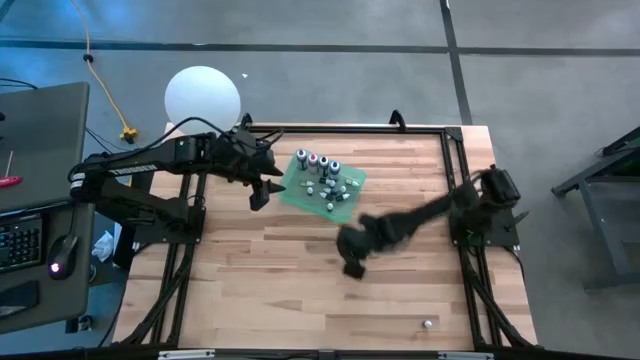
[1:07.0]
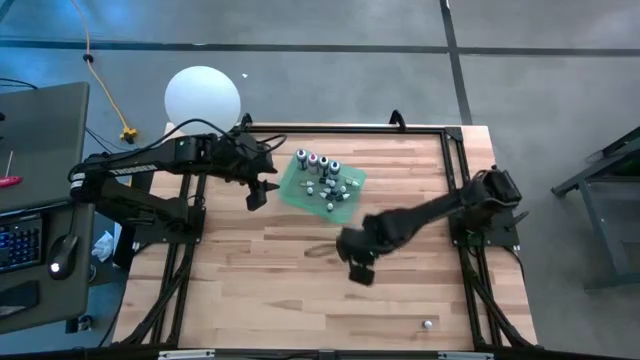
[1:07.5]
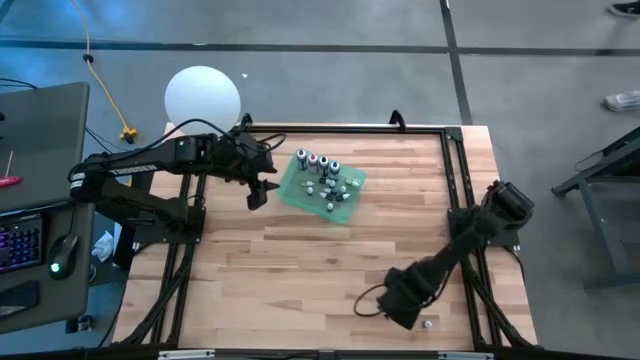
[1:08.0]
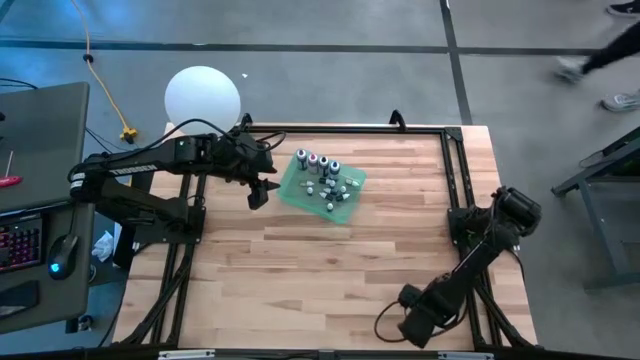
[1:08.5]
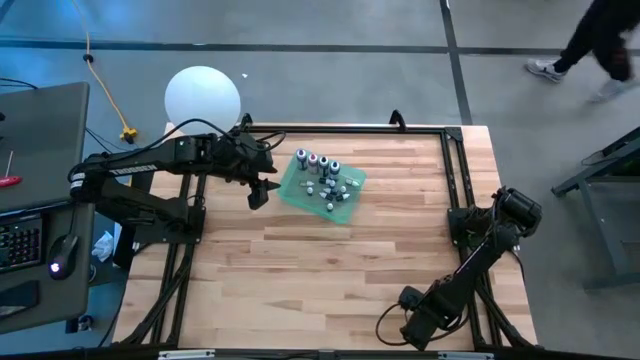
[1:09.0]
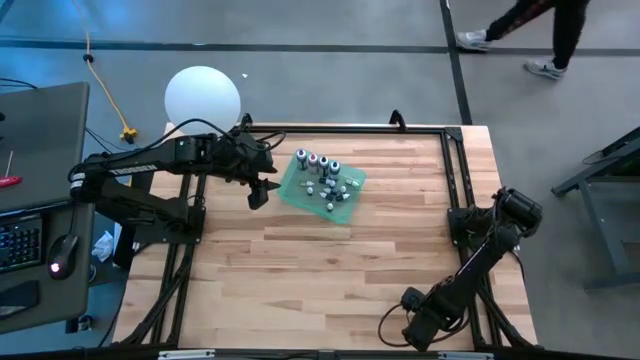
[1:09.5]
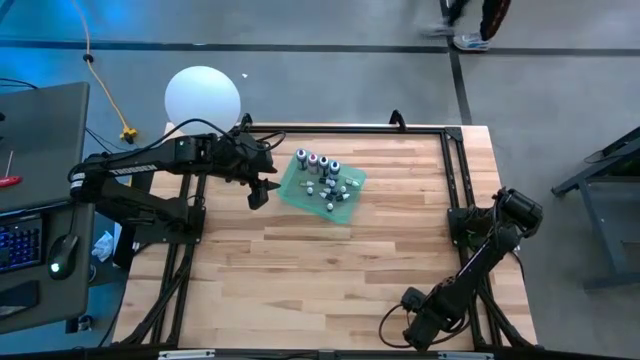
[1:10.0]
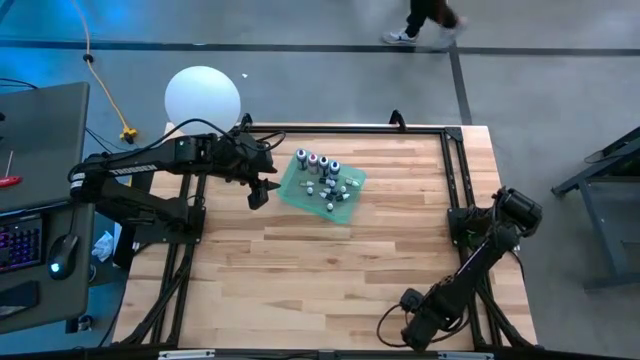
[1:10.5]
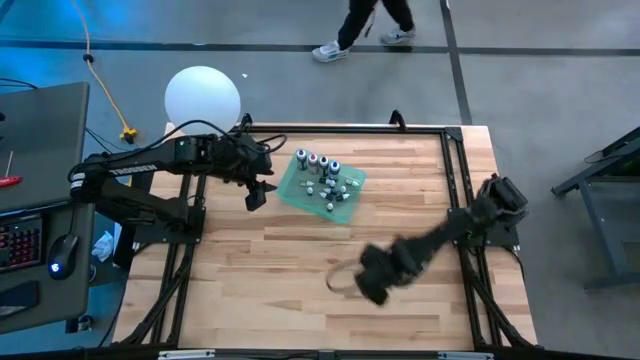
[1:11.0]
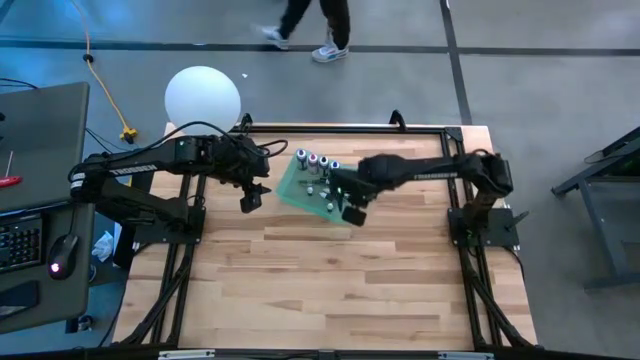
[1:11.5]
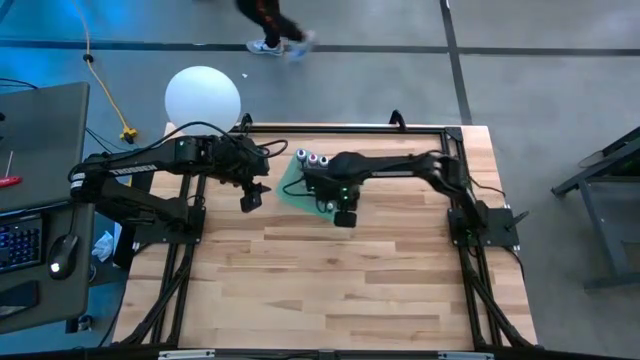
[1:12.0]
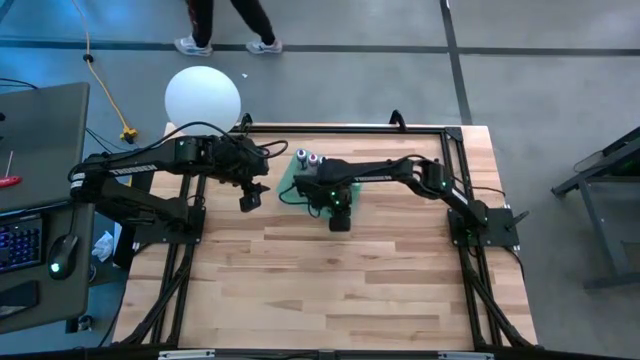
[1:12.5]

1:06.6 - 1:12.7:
Task: Pick & Place food coloring
Put the orange food coloring bottle into the bin

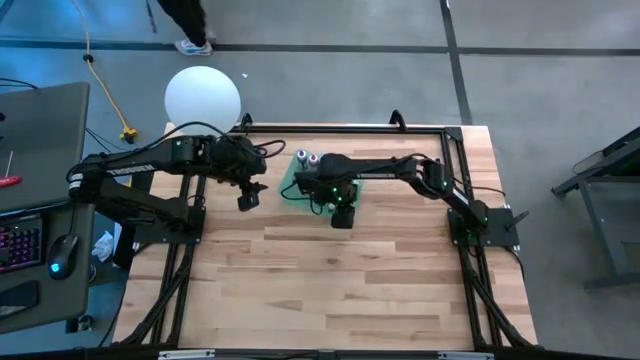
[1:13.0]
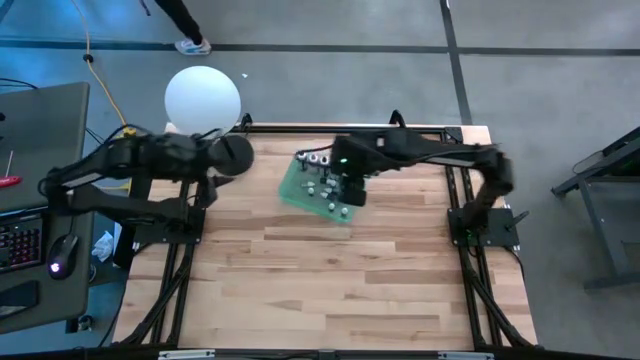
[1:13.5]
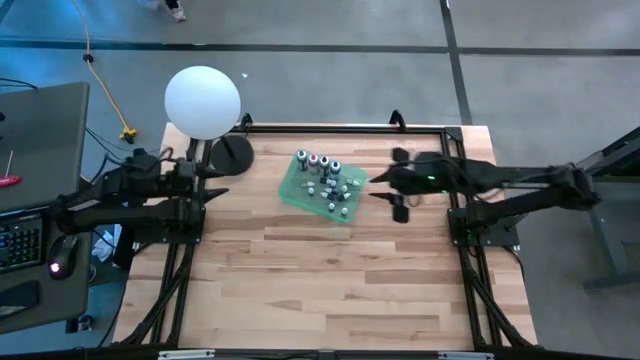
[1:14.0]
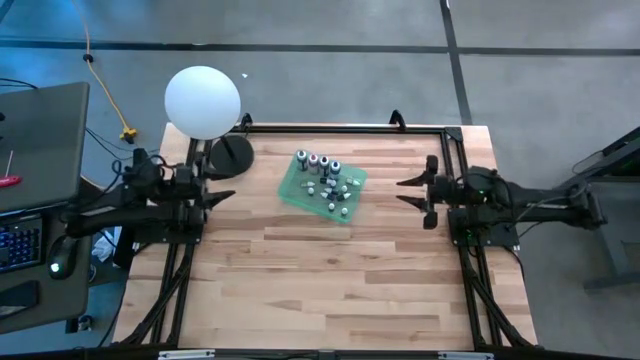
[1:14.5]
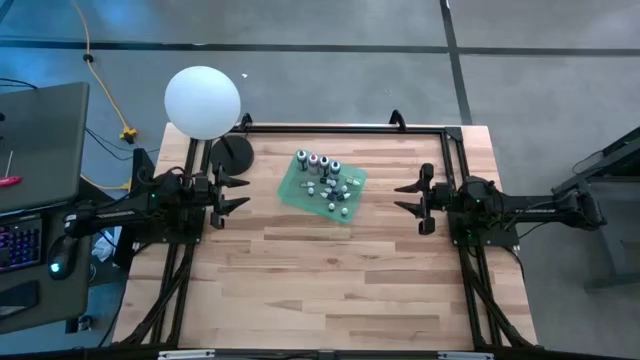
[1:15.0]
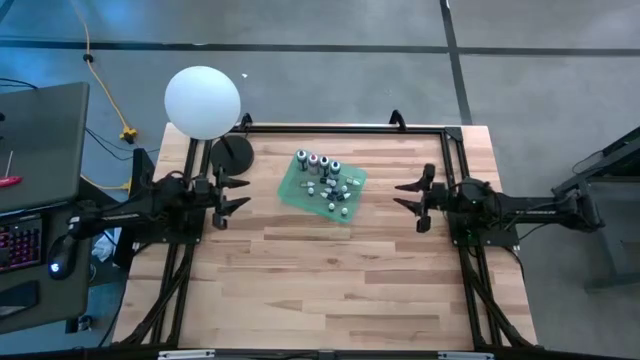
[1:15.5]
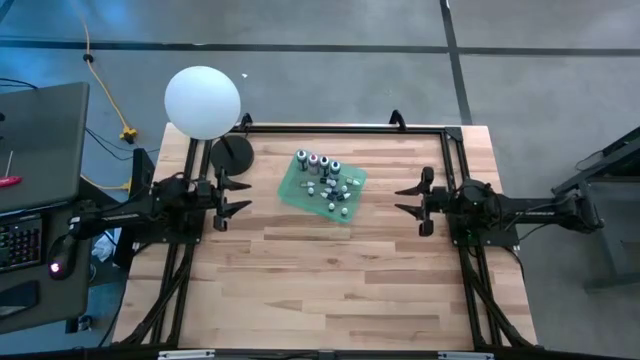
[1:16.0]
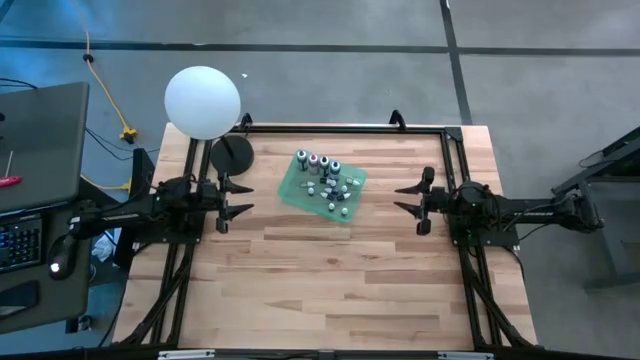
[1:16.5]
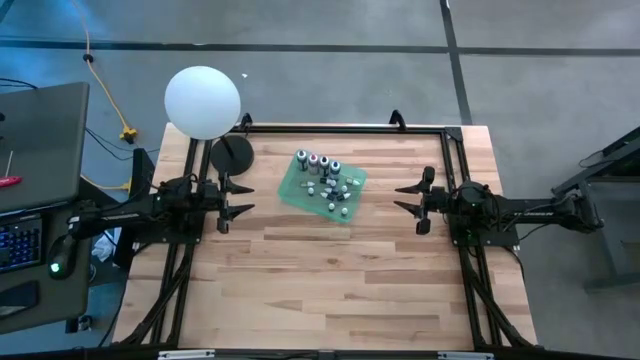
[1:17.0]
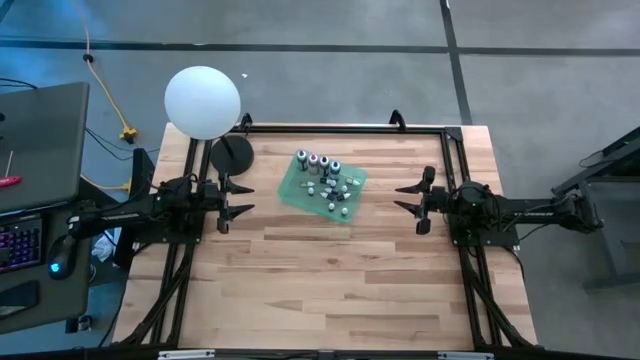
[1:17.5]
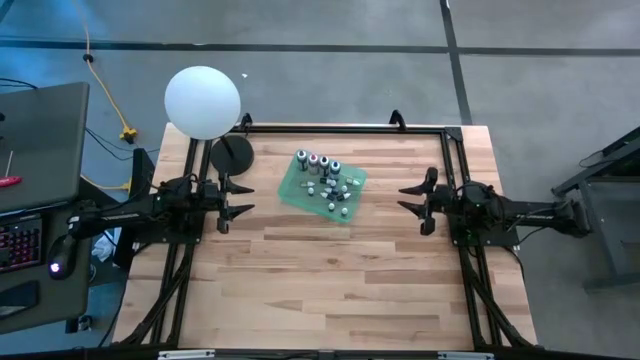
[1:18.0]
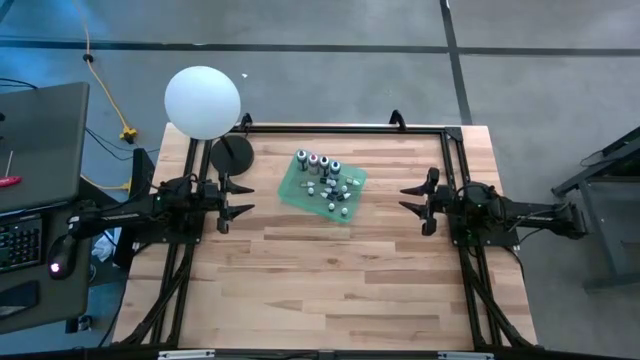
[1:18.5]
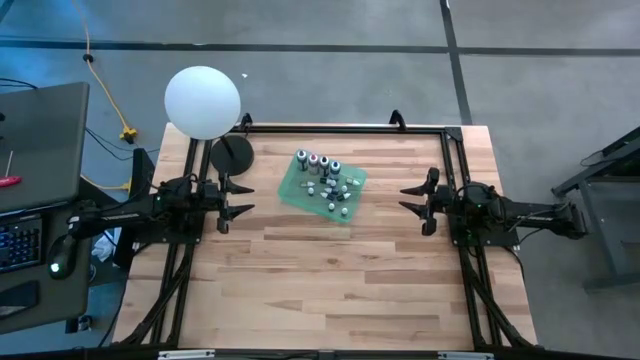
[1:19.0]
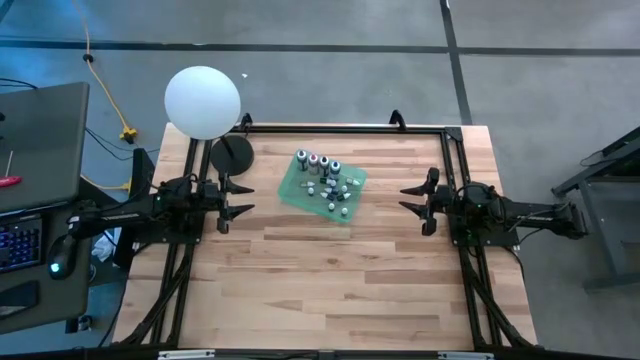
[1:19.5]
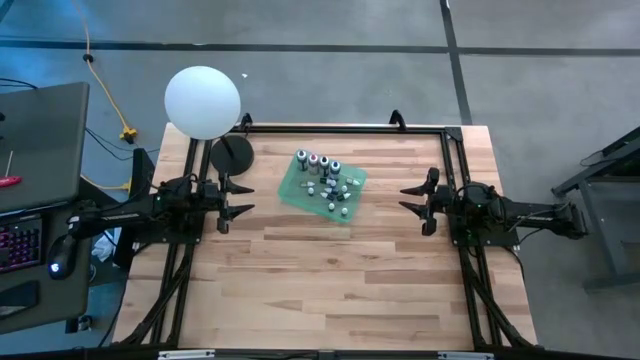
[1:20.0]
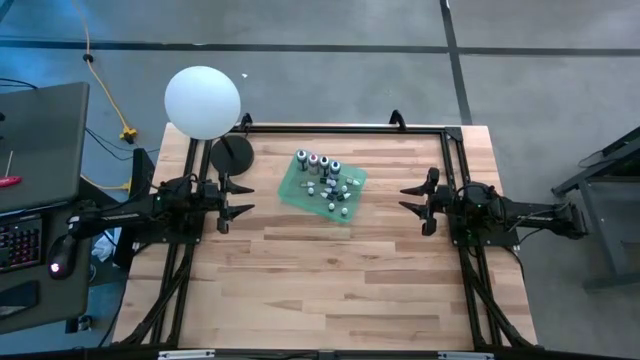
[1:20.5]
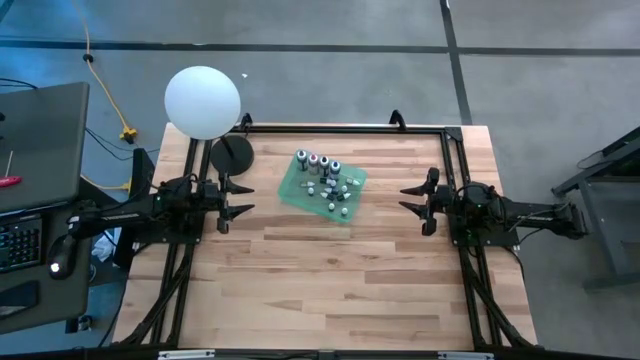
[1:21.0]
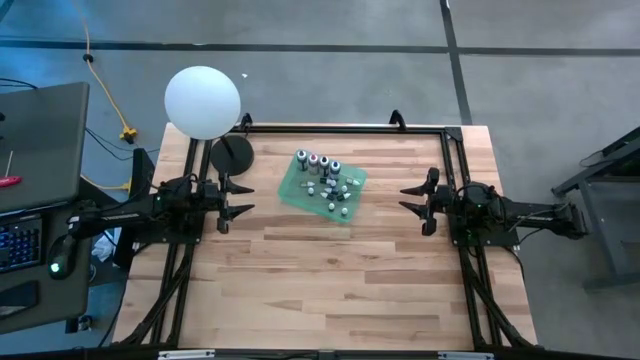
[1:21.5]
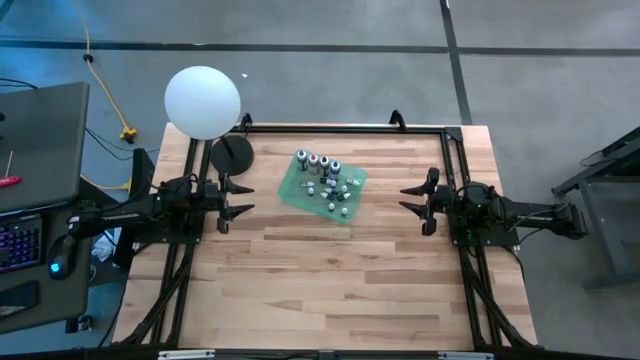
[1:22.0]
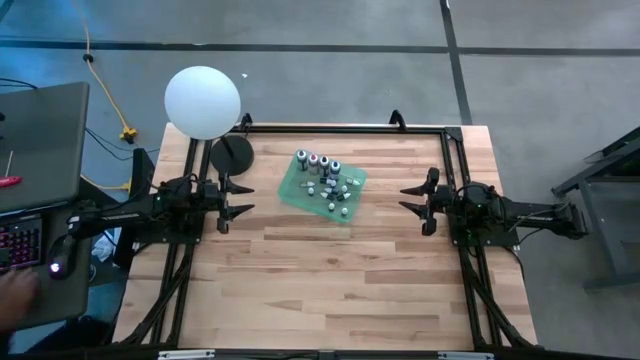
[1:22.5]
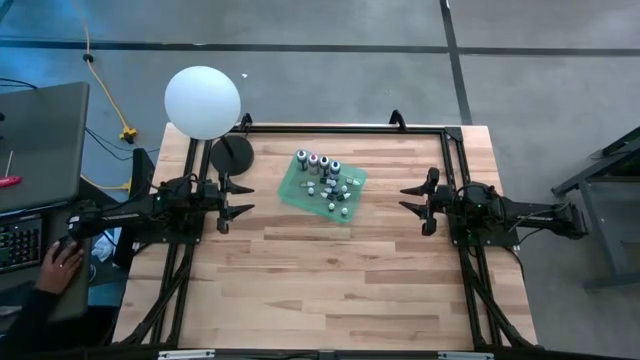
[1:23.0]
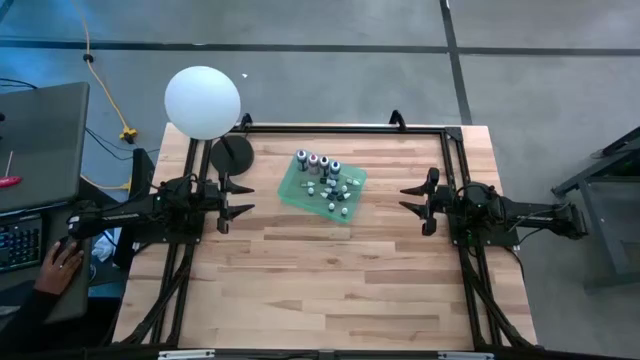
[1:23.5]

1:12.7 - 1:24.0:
Return to Home Position

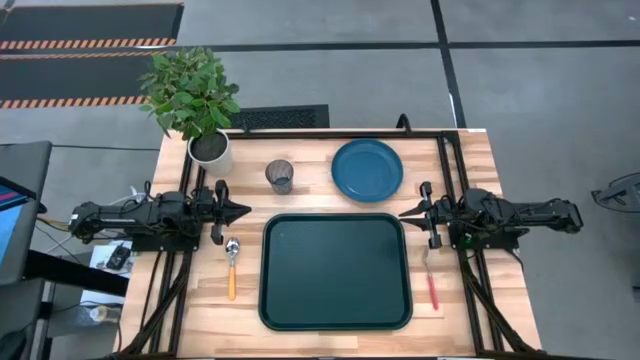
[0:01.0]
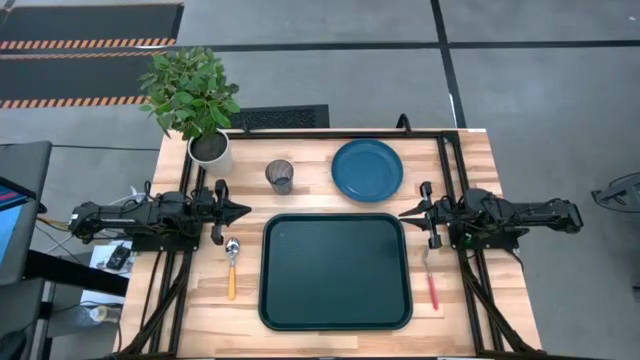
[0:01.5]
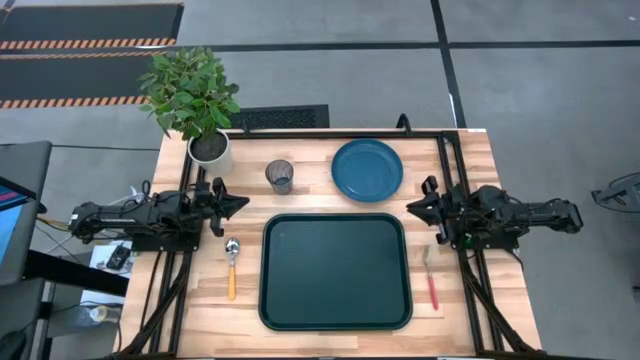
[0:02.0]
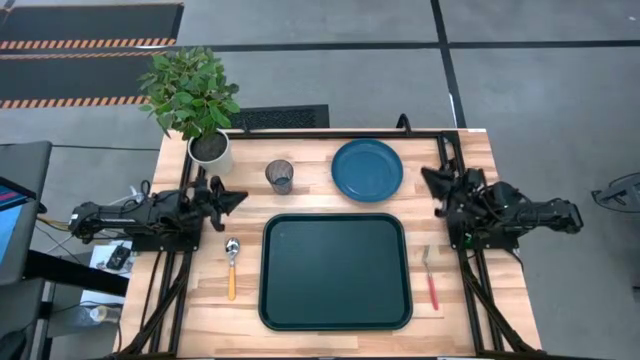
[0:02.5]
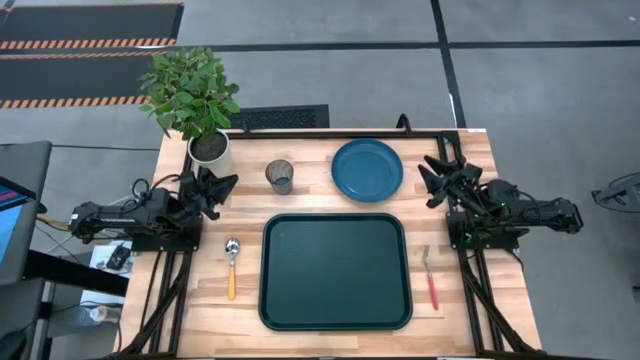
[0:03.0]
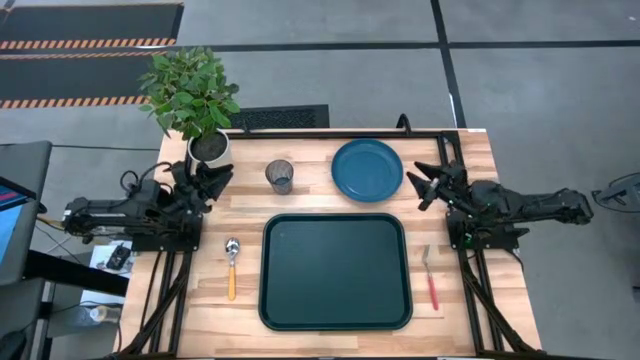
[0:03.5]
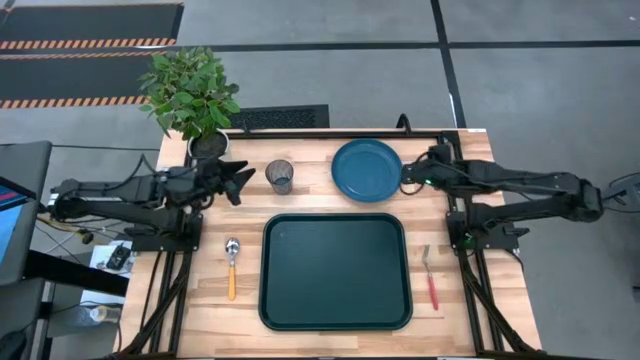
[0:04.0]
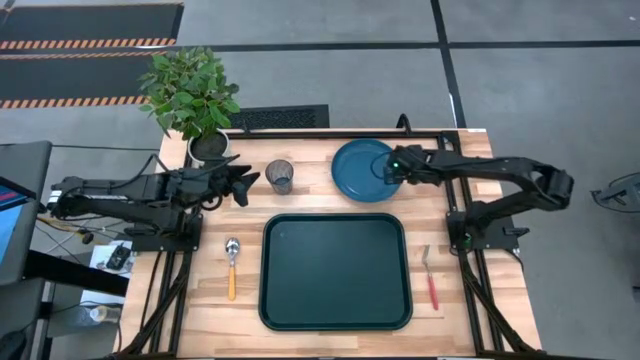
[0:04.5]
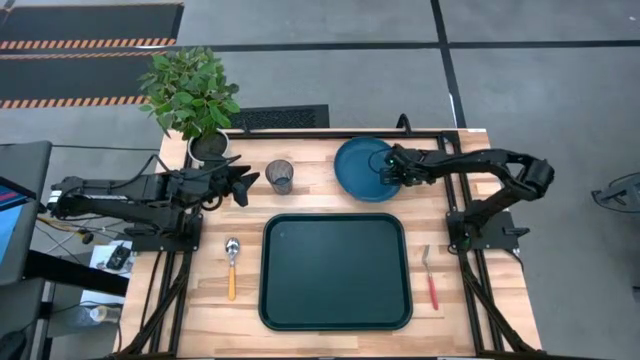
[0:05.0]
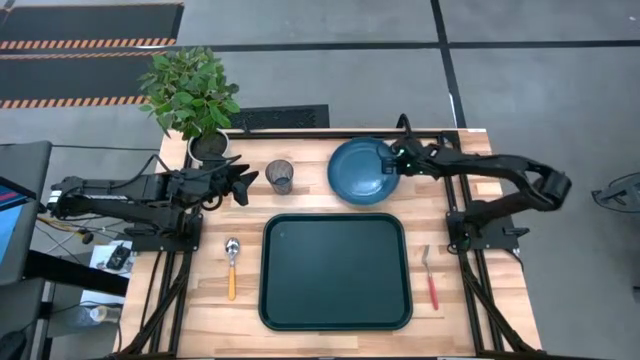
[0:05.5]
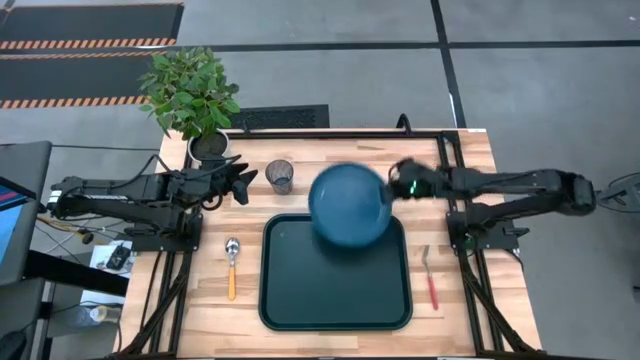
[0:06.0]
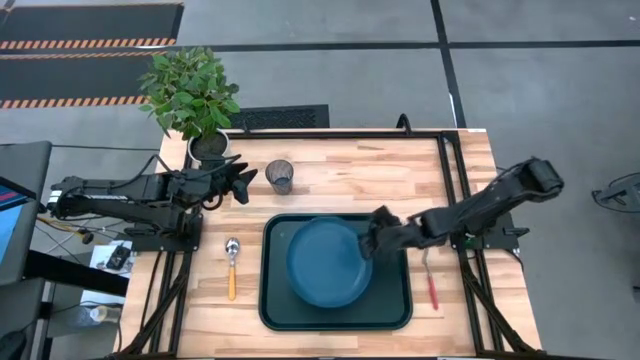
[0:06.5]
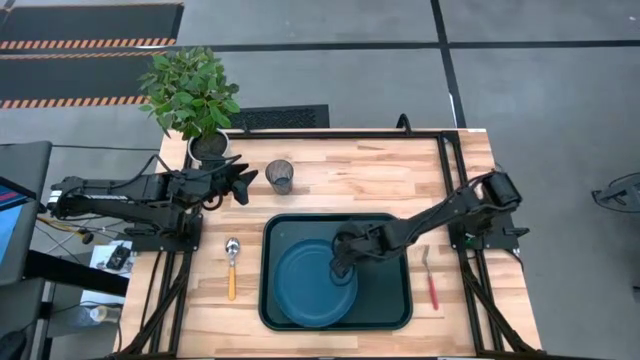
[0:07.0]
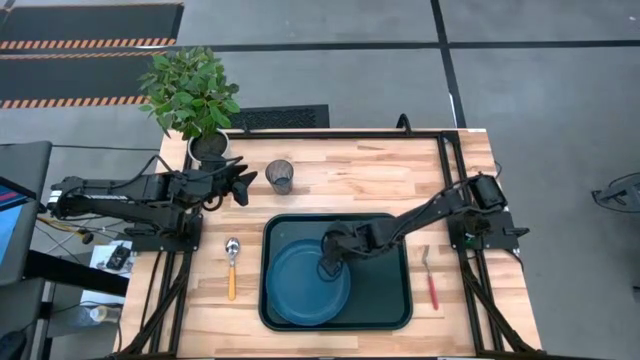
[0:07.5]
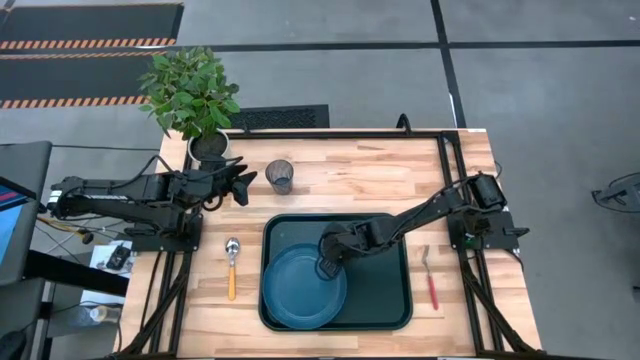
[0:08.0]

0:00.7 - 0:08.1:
Task: Pick and place plate/cup/fork/spoon on tray
Put the blue plate on the bottom left of the black serving tray
